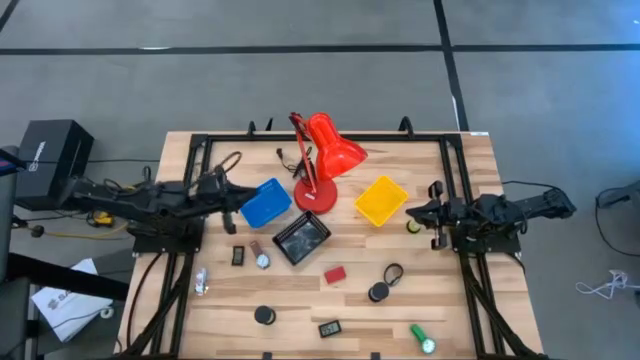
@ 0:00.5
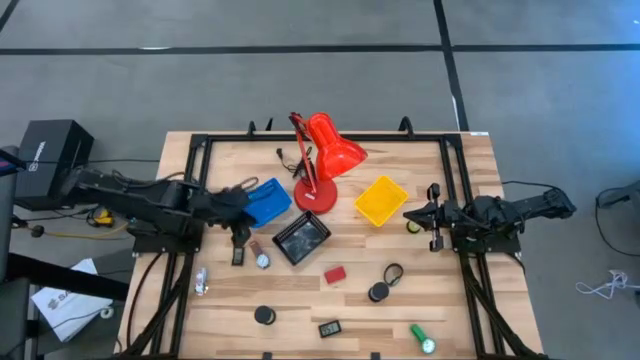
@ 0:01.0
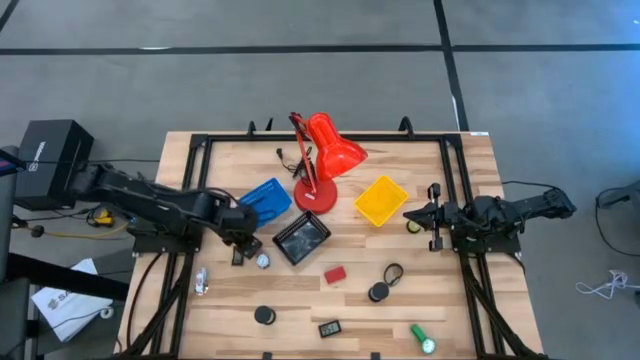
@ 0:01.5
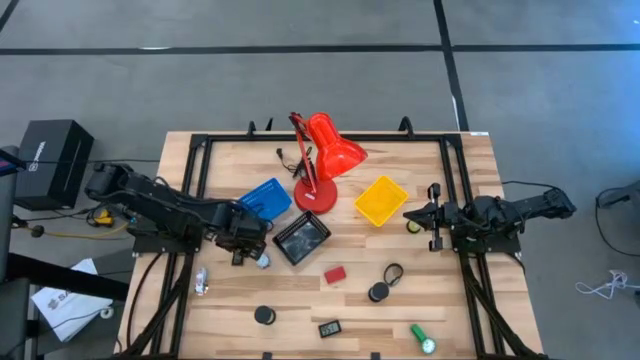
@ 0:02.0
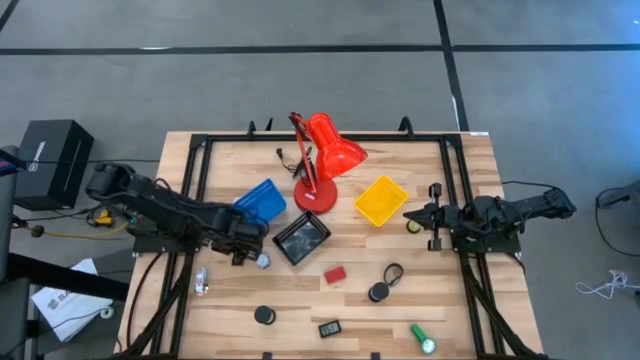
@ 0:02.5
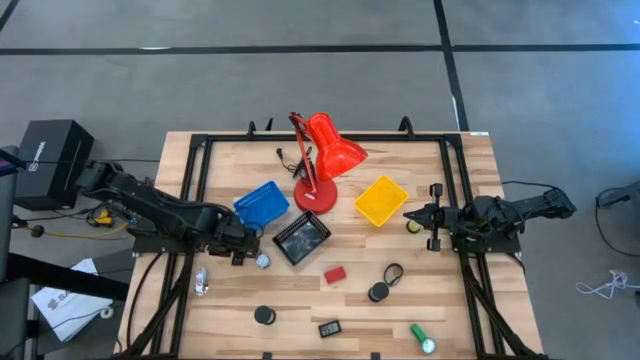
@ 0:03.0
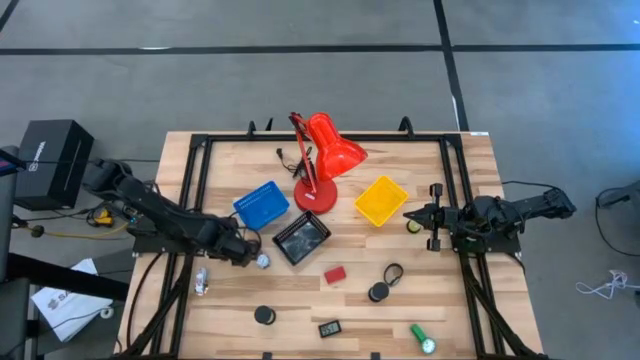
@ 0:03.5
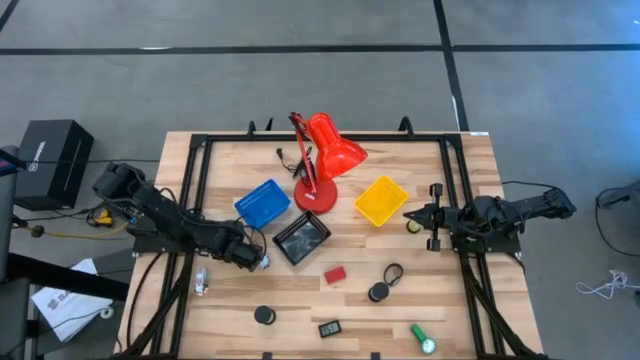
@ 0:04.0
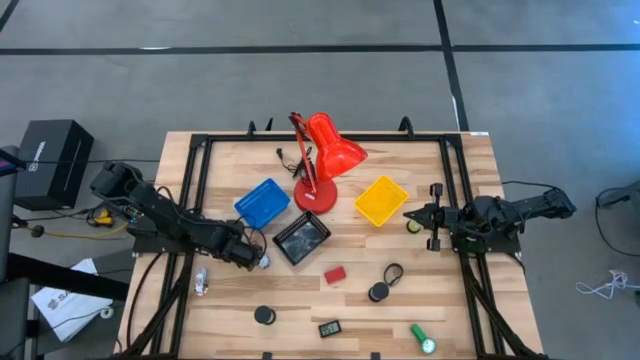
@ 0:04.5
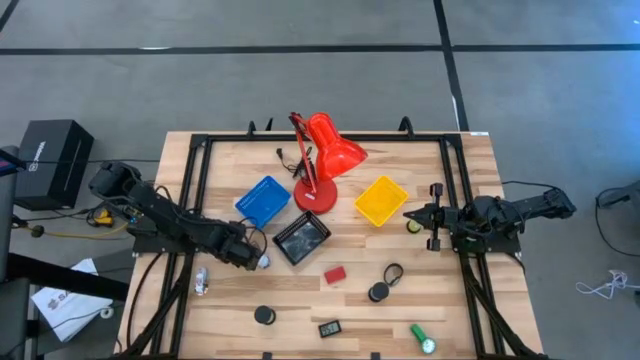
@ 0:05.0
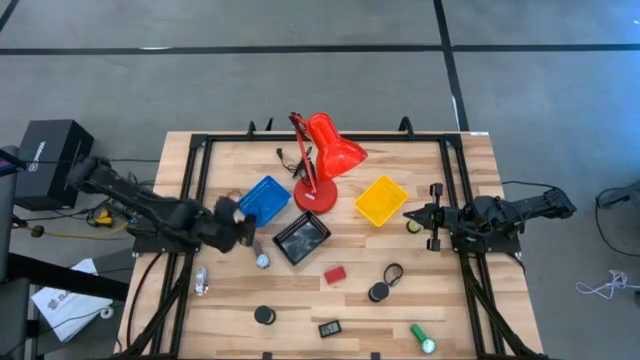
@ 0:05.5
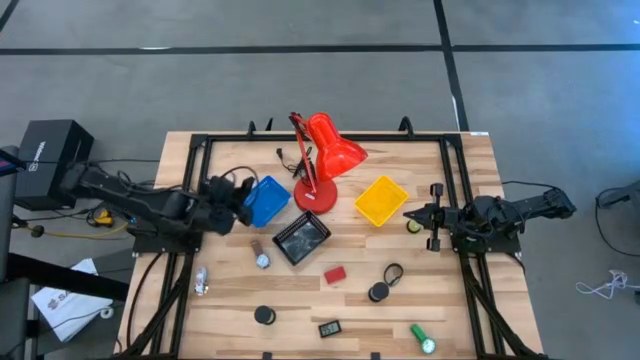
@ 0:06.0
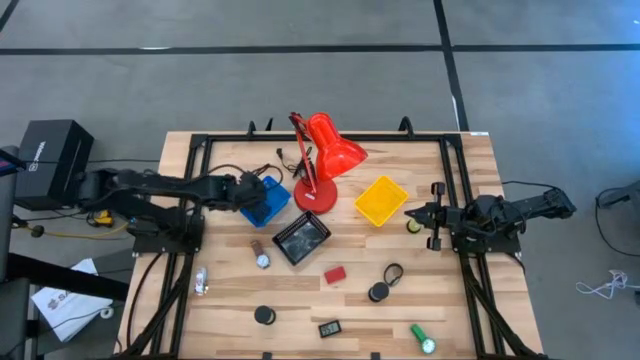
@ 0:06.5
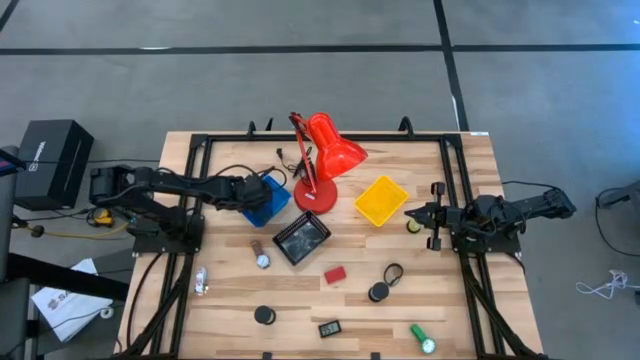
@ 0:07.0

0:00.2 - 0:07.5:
Task: Pick & Place Office items
Put the right black timer into the blue bin

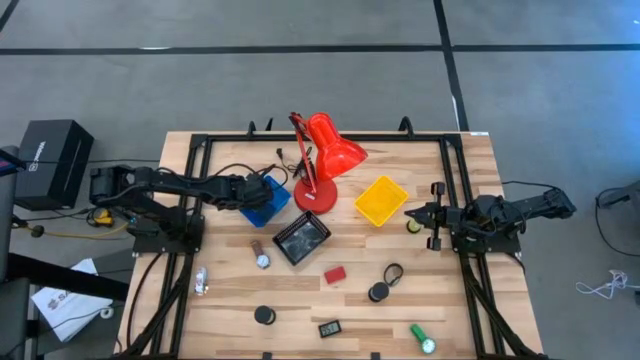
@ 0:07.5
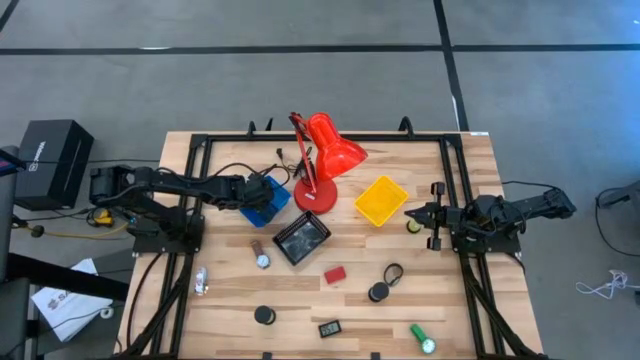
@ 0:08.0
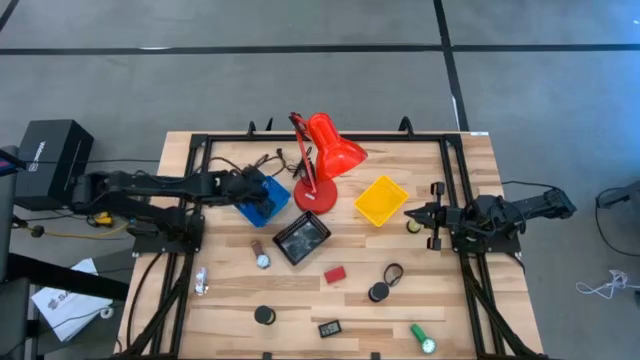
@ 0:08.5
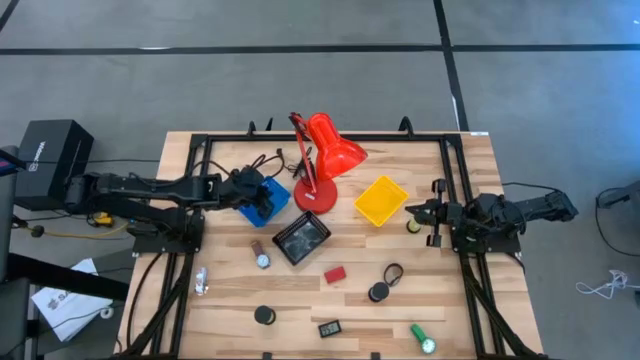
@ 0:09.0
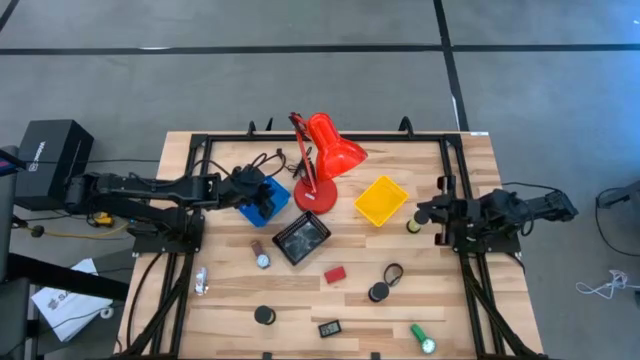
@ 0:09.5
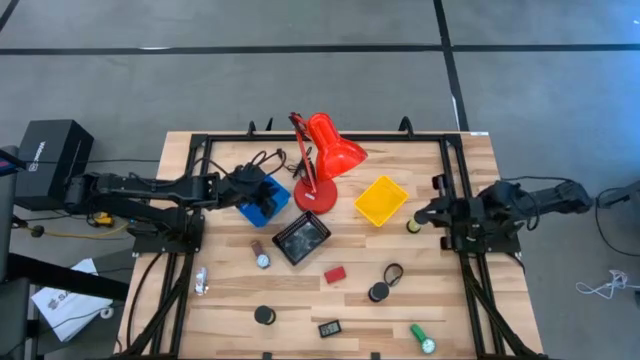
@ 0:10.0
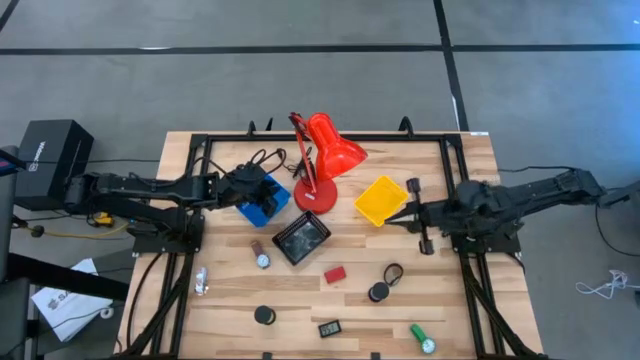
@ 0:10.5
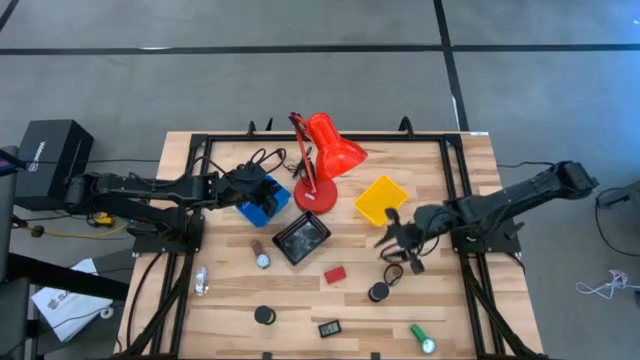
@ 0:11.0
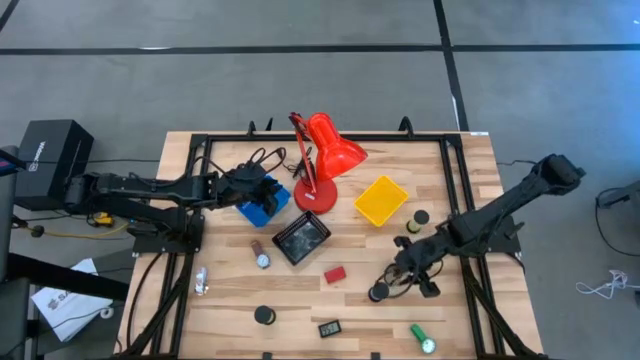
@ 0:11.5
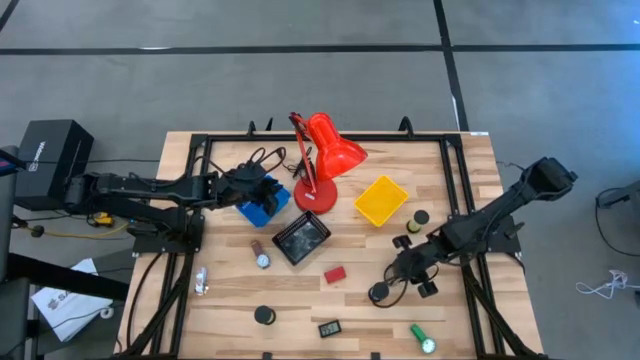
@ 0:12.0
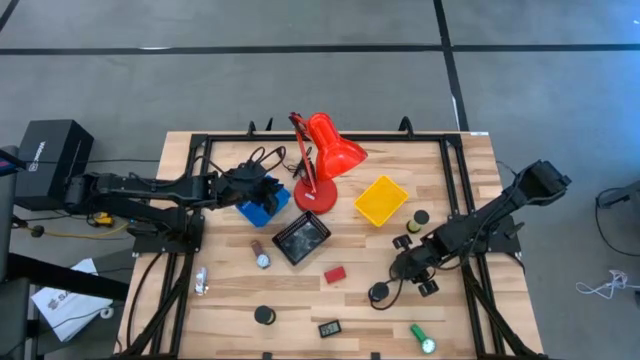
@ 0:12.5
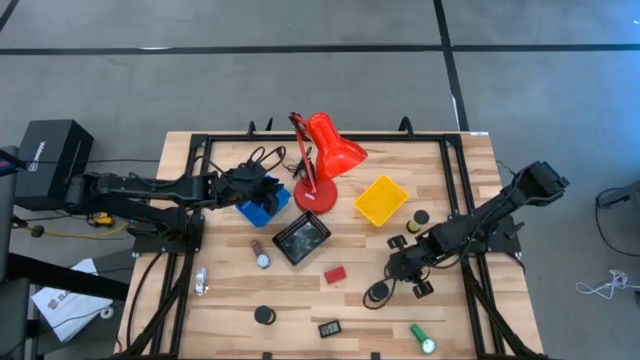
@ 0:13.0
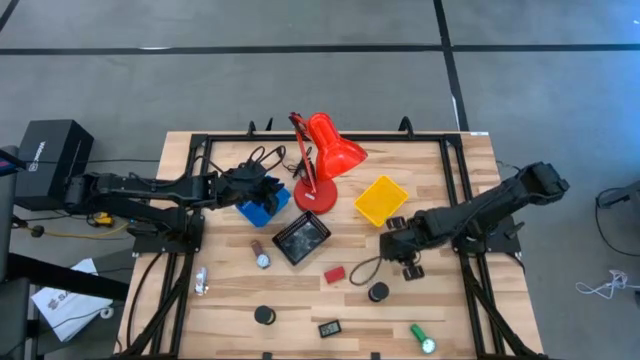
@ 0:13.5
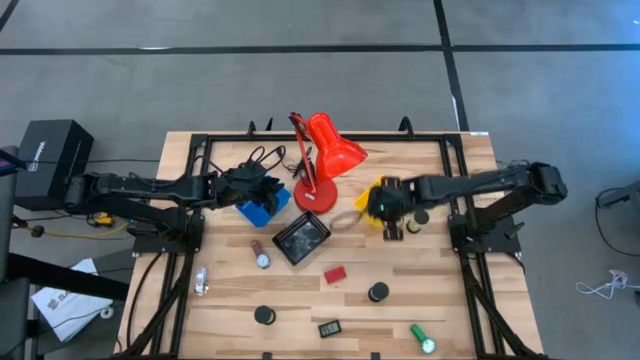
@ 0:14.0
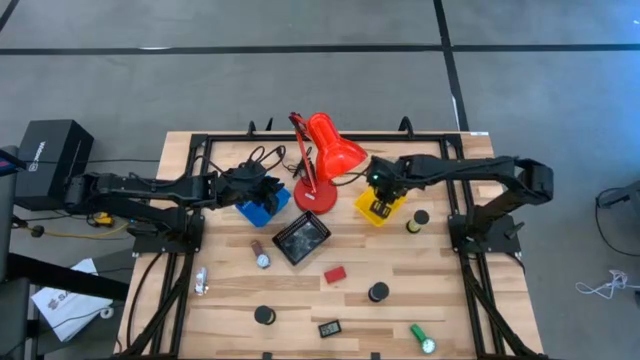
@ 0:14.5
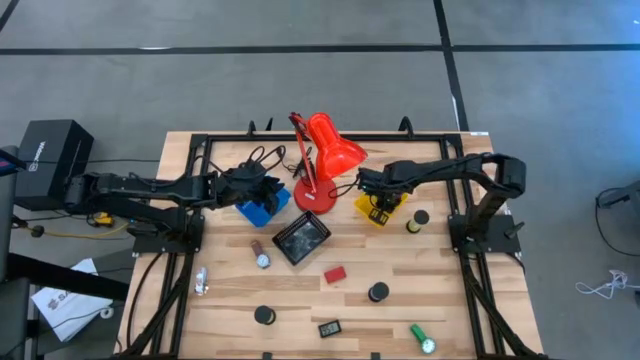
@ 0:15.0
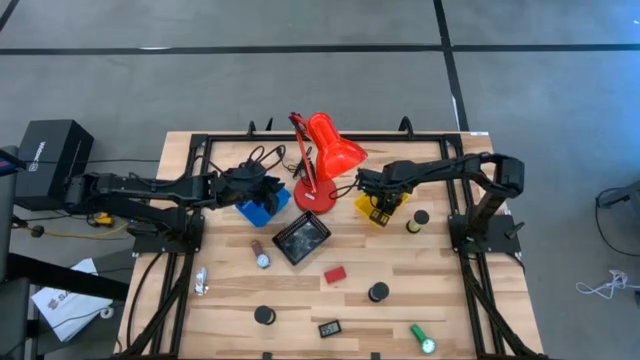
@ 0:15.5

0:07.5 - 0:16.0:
Put the black watch into the yellow bin

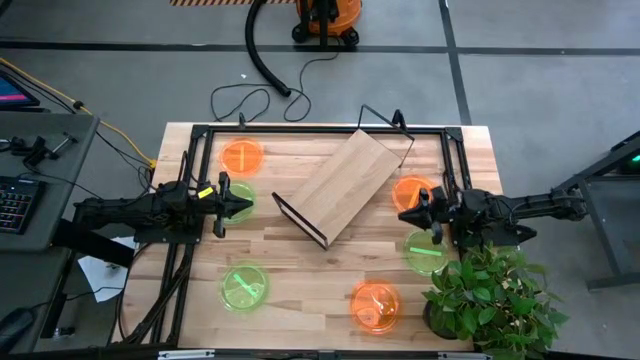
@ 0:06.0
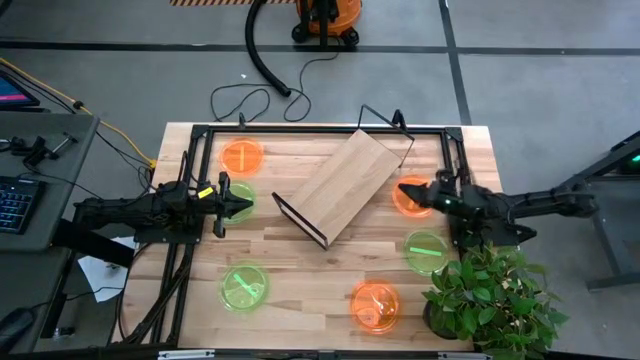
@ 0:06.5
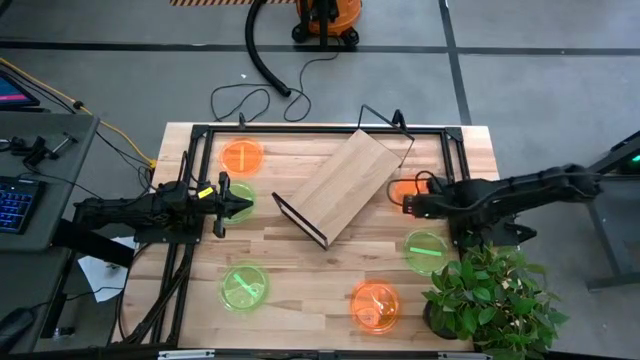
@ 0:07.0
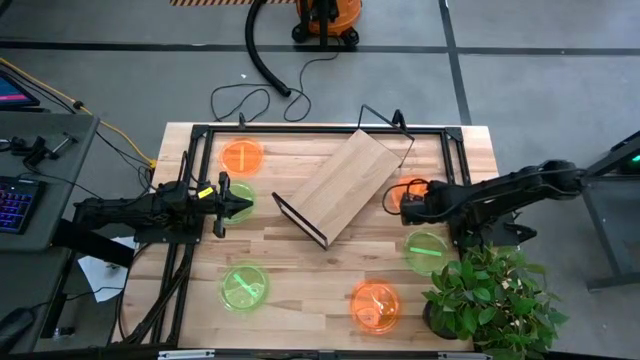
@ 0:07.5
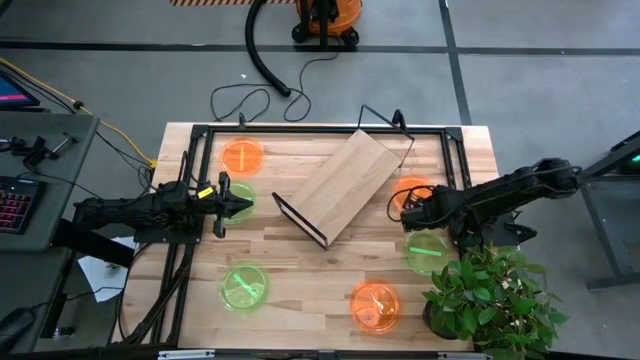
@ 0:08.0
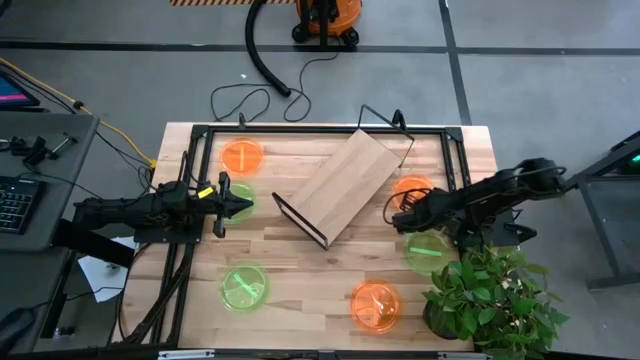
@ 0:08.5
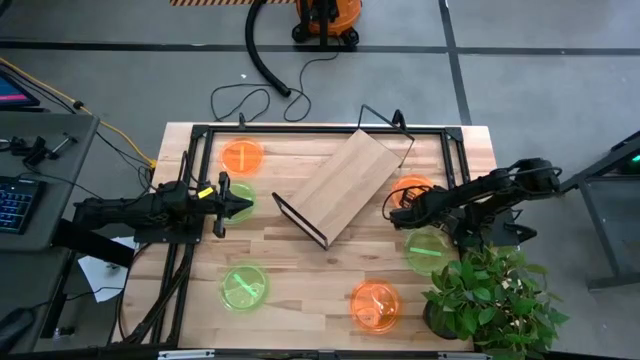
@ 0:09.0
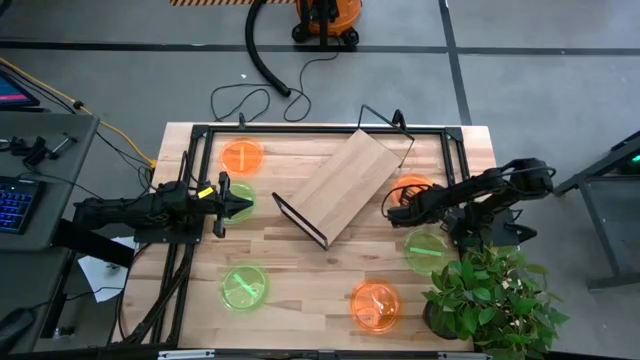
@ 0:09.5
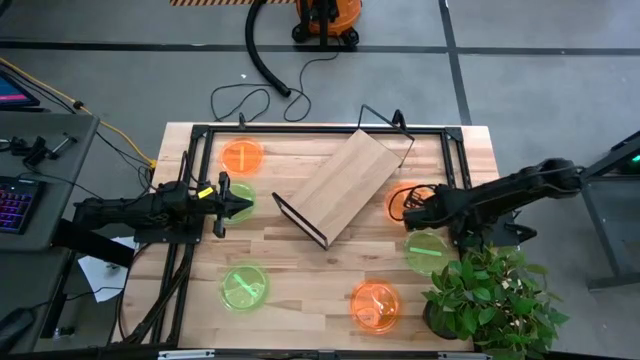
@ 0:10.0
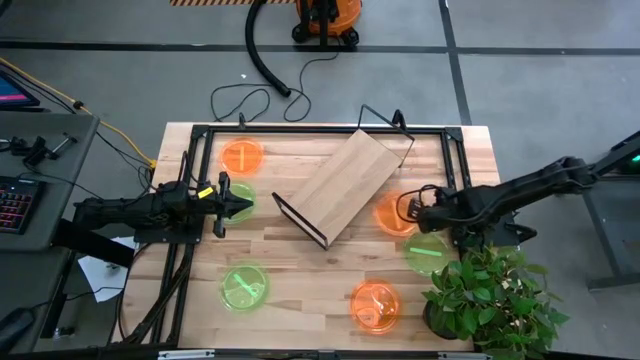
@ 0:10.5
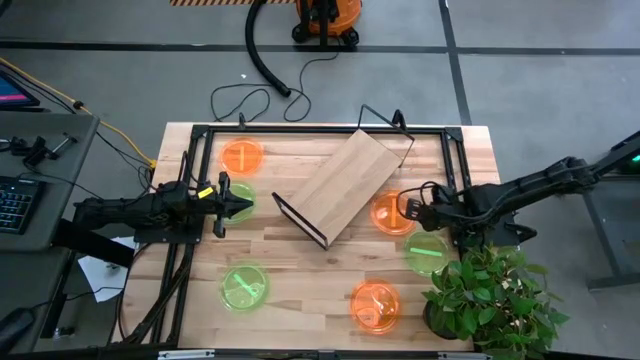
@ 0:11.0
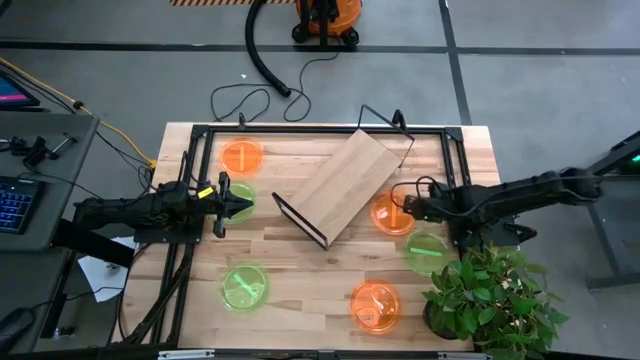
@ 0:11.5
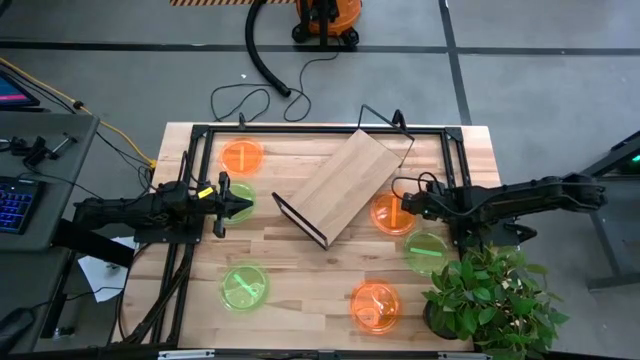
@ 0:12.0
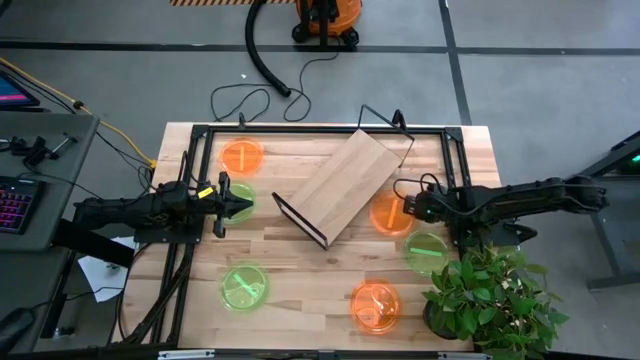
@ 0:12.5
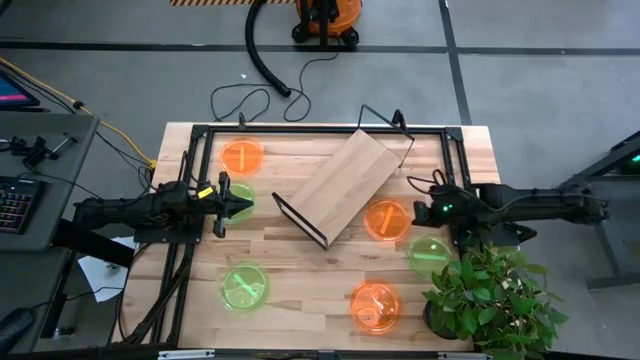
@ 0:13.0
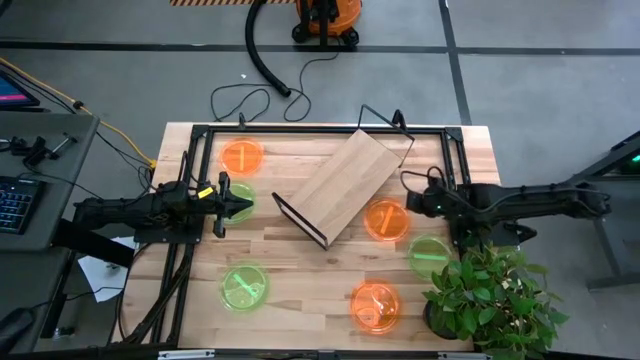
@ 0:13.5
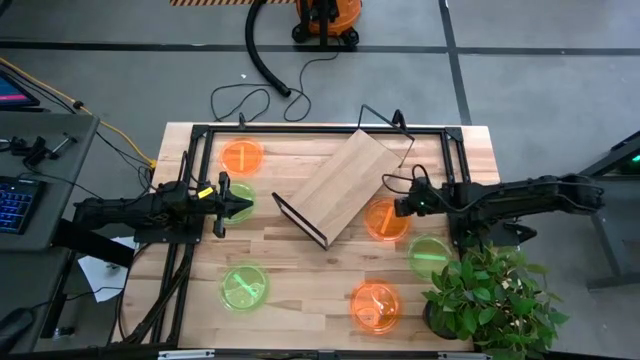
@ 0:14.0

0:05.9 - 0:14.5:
Task: Place and stack plates onto a shelf
Put the middle right orange plate on the shelf
